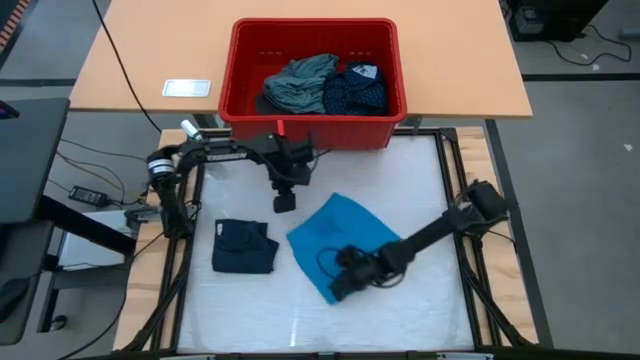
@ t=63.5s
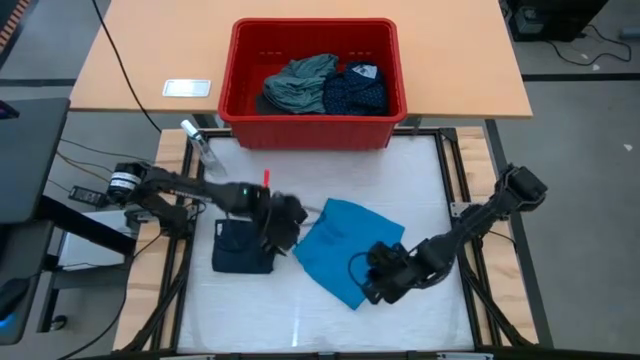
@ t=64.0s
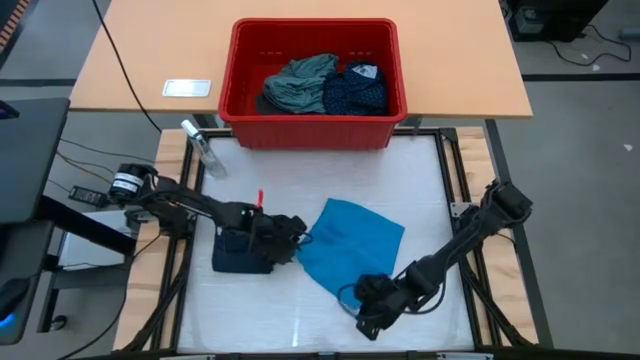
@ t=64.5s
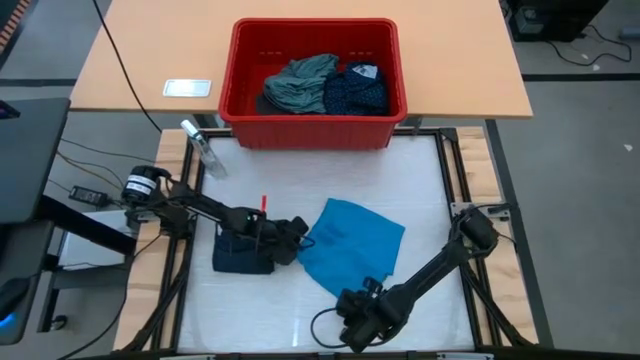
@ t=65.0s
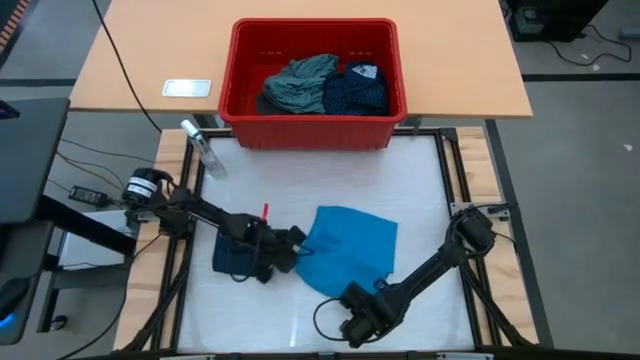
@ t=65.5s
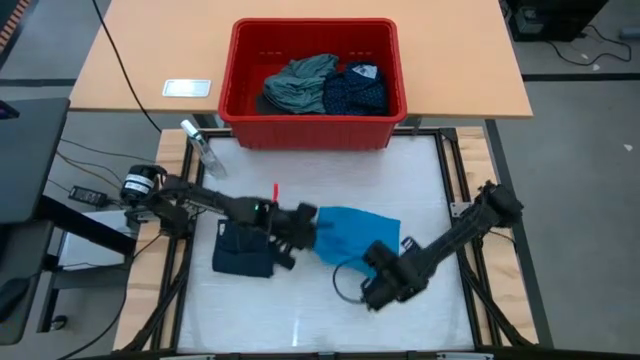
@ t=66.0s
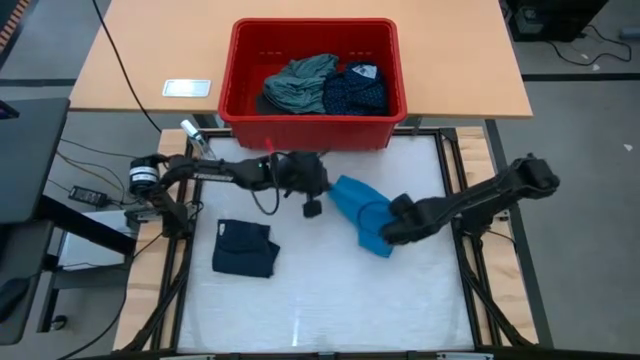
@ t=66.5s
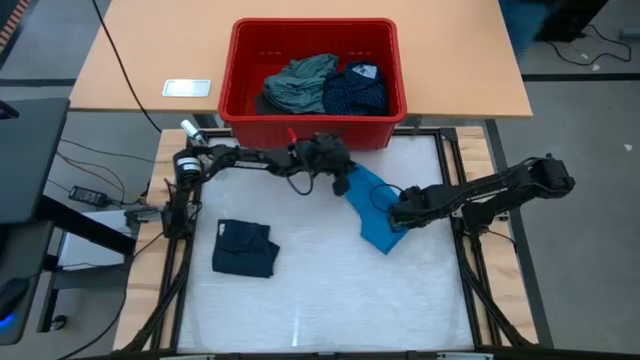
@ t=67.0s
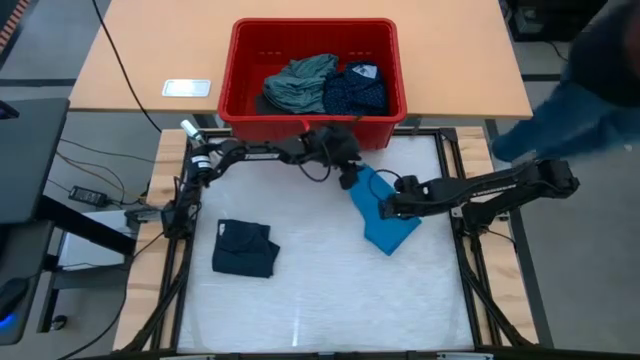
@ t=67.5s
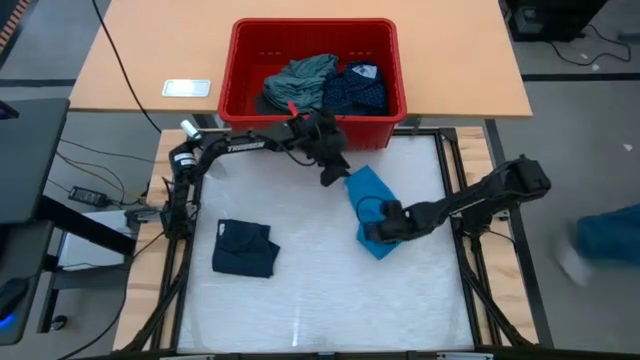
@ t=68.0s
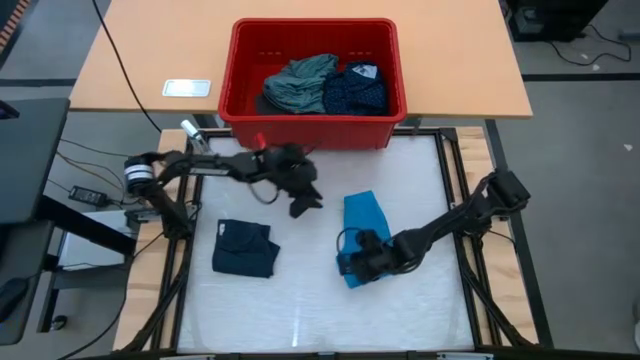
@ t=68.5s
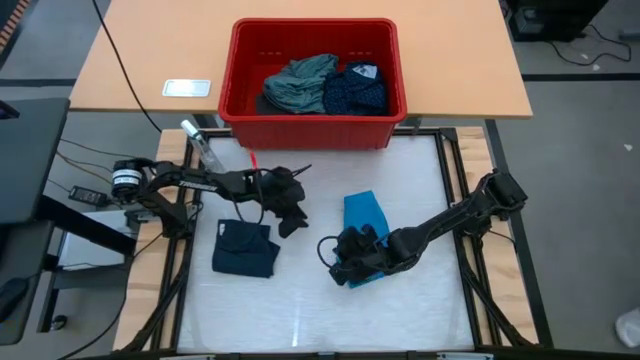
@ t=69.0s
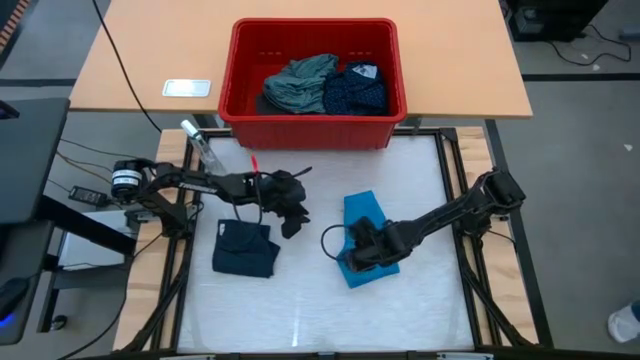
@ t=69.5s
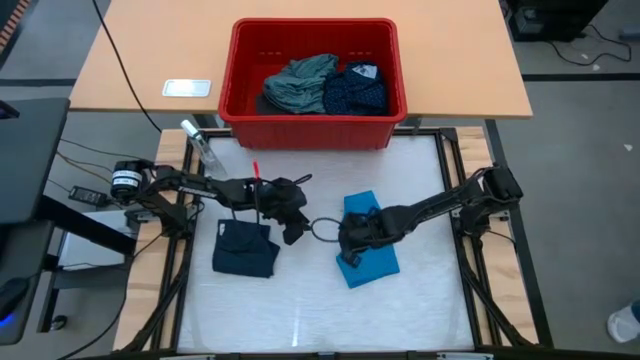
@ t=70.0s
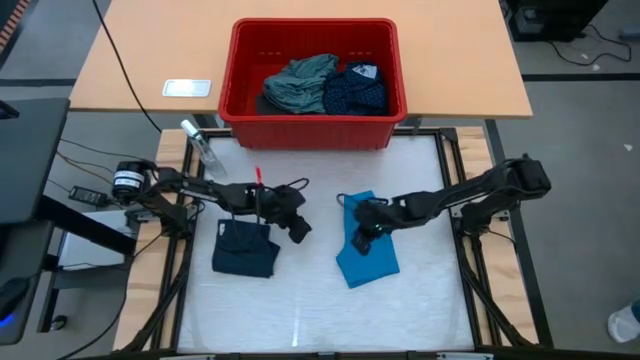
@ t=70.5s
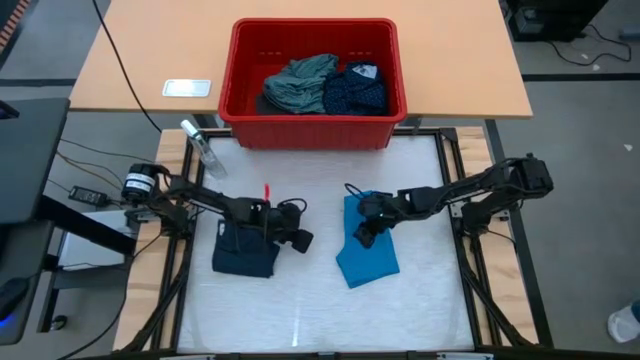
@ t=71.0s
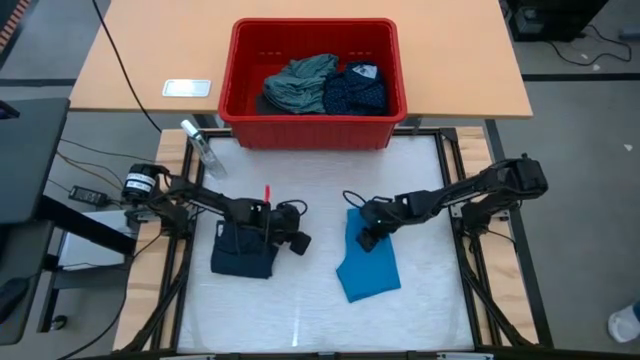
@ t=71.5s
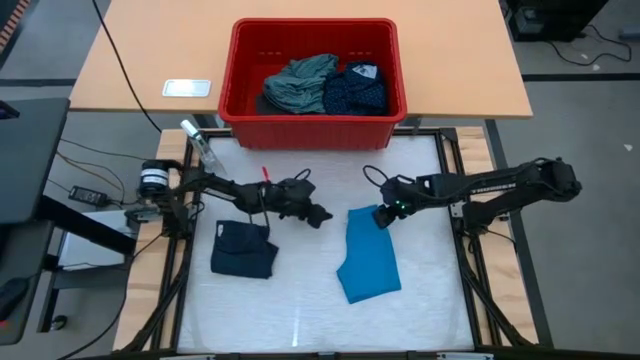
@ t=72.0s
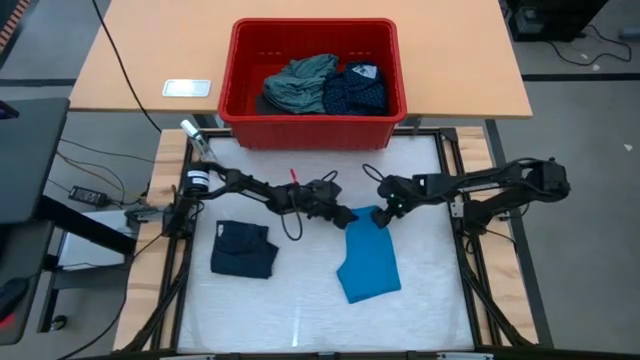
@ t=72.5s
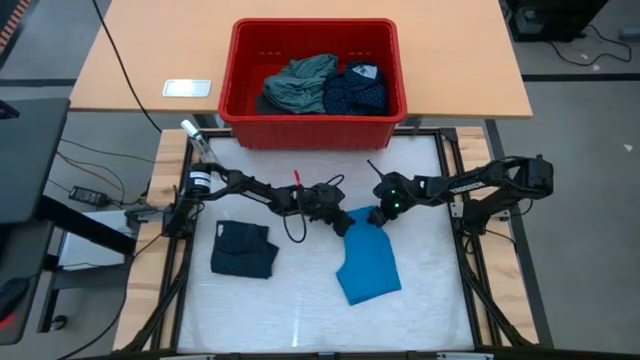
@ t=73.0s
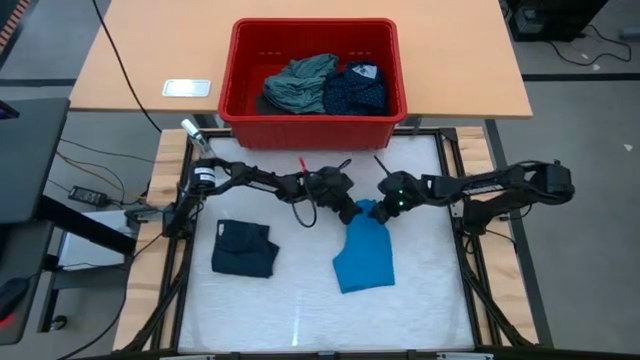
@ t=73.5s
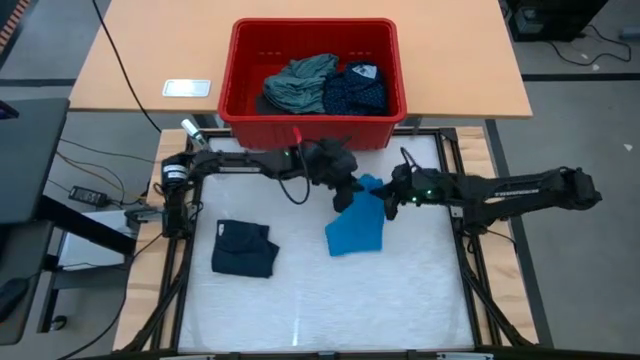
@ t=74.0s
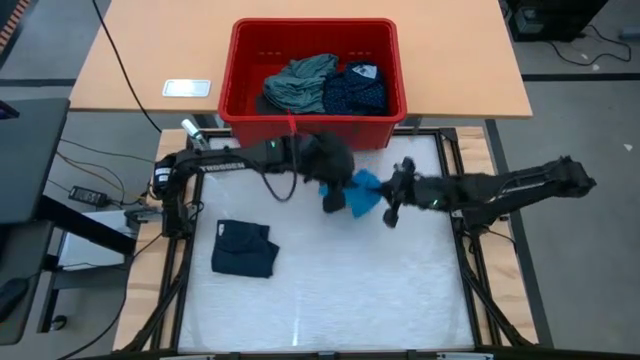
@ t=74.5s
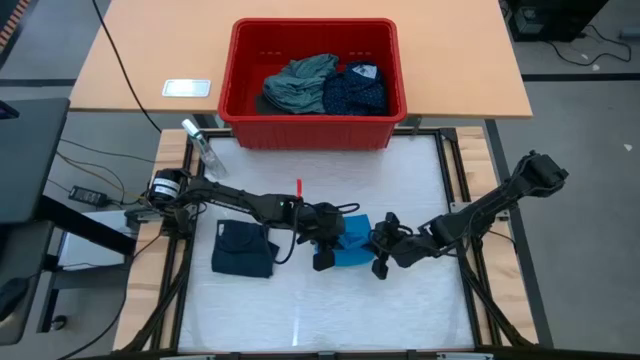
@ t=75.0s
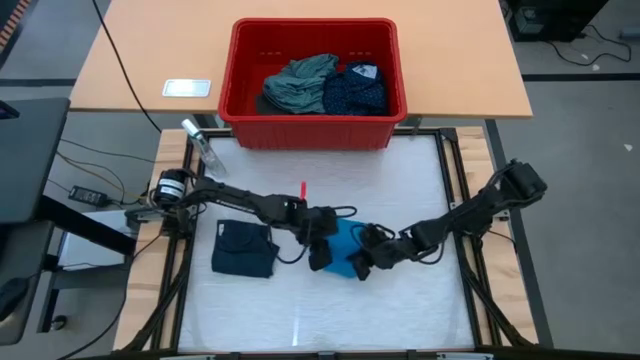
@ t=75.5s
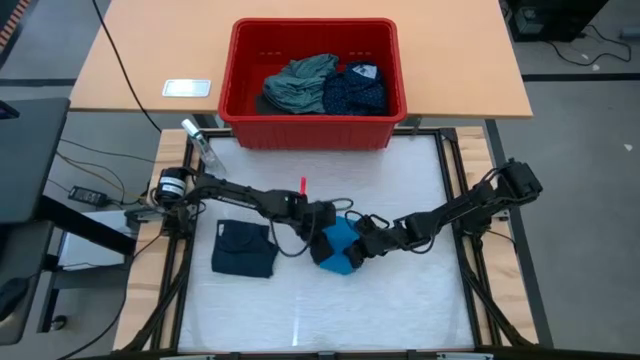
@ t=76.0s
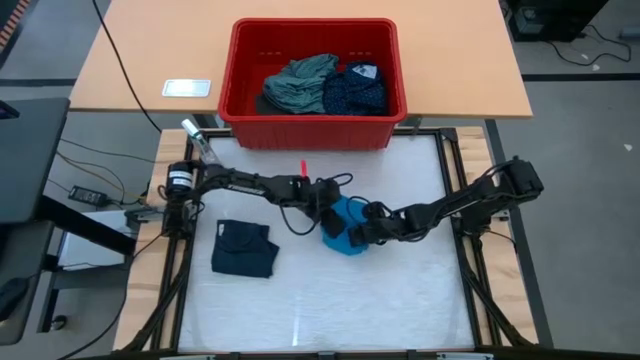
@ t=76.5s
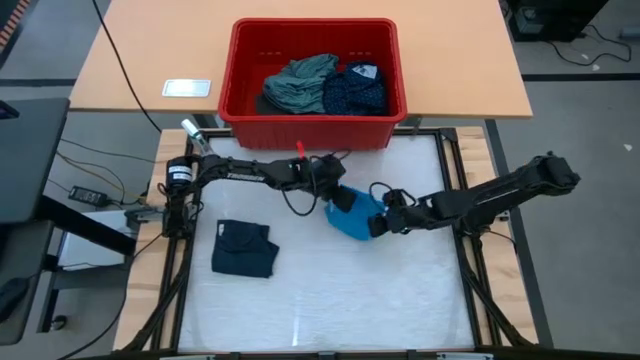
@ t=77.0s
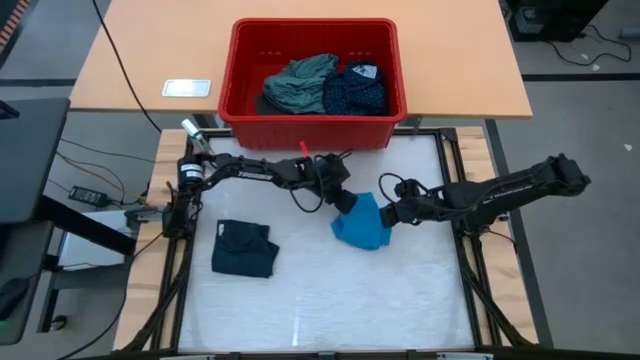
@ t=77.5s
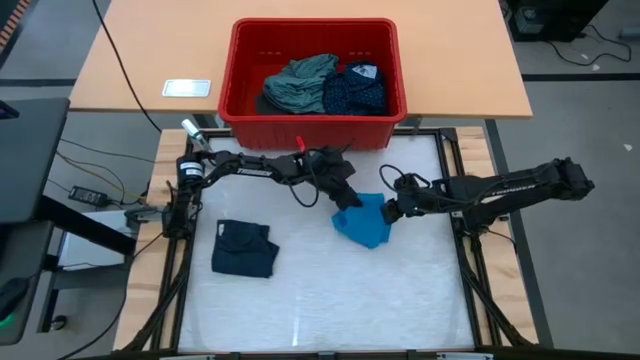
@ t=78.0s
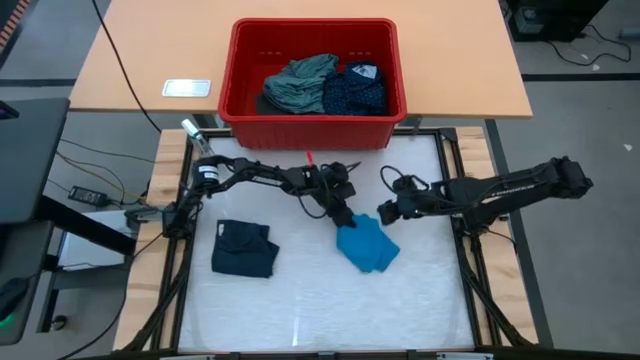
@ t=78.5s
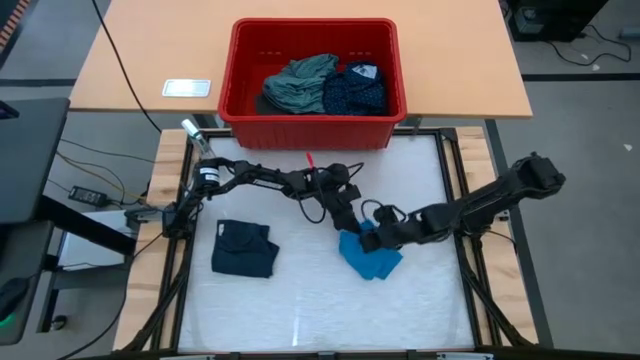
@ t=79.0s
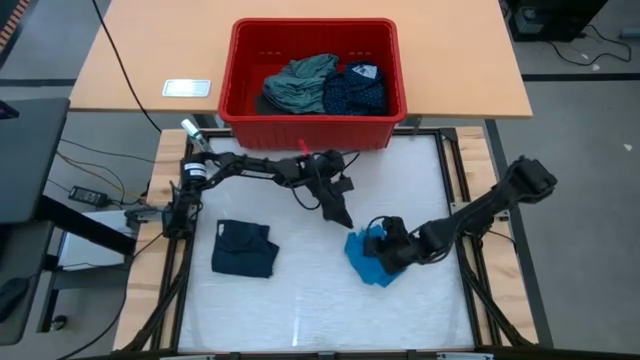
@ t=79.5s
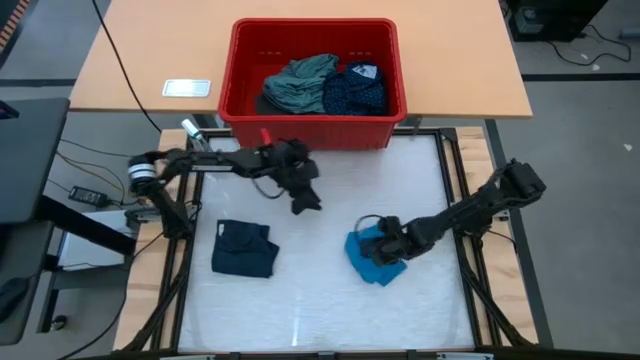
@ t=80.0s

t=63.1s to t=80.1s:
Task: Fold laundry
Fold the light blue shorts

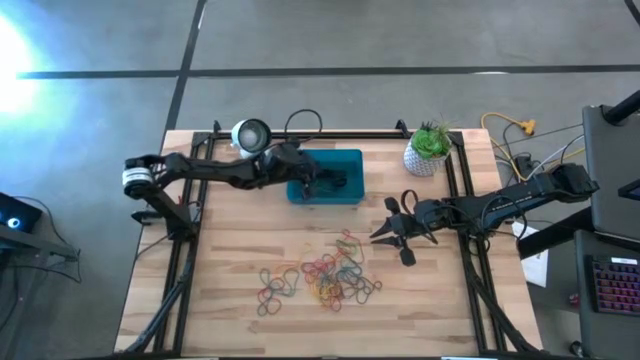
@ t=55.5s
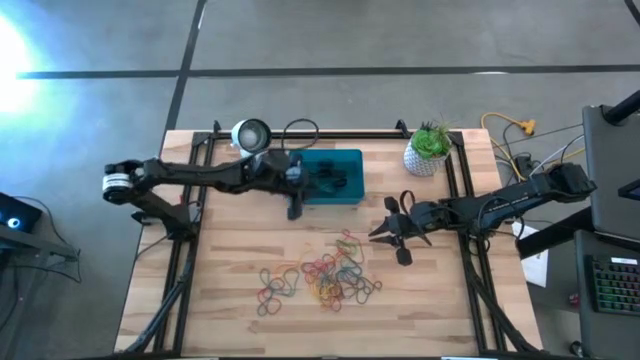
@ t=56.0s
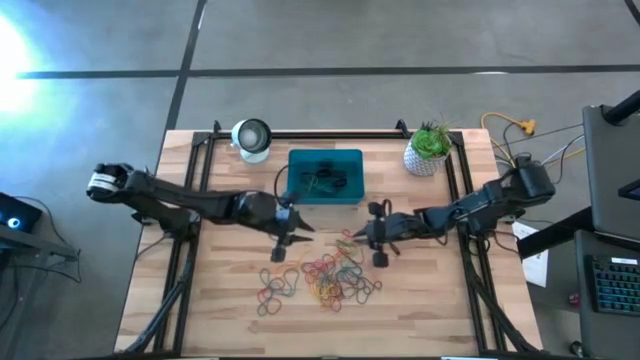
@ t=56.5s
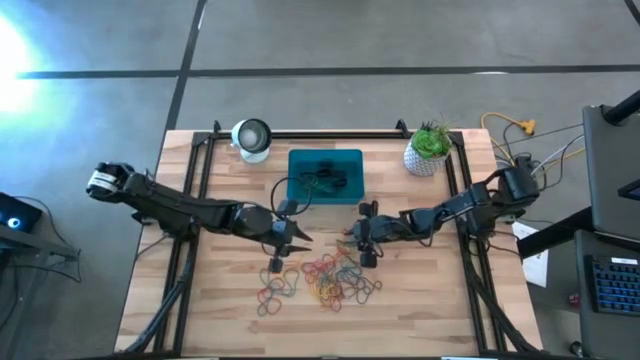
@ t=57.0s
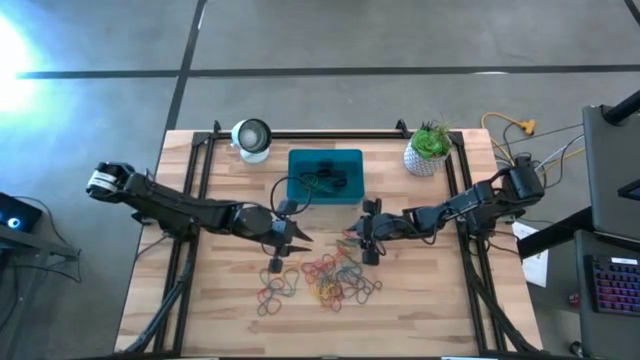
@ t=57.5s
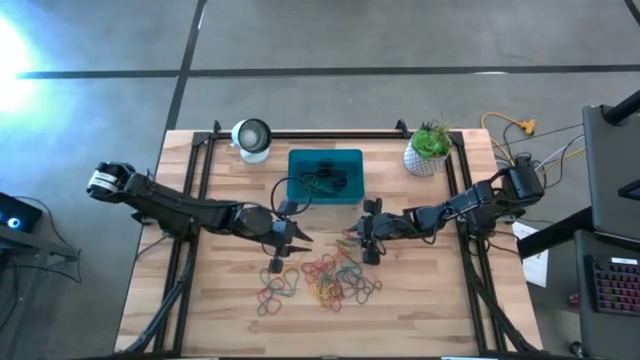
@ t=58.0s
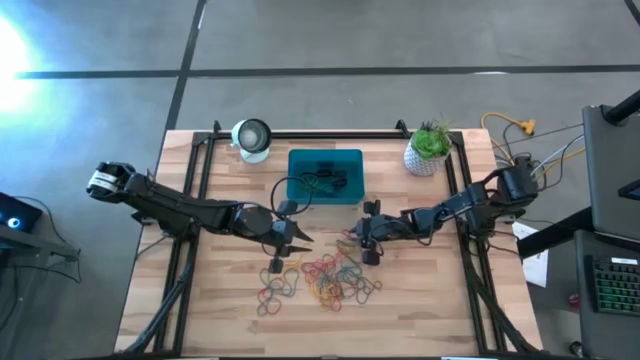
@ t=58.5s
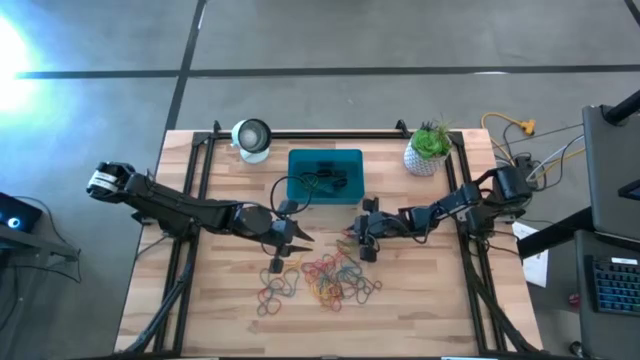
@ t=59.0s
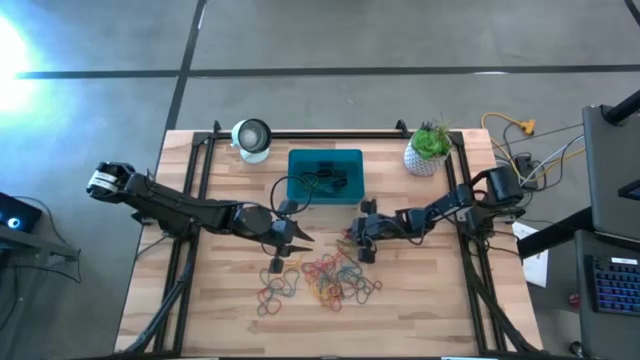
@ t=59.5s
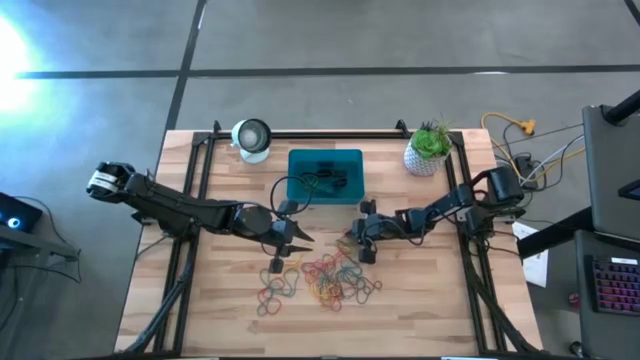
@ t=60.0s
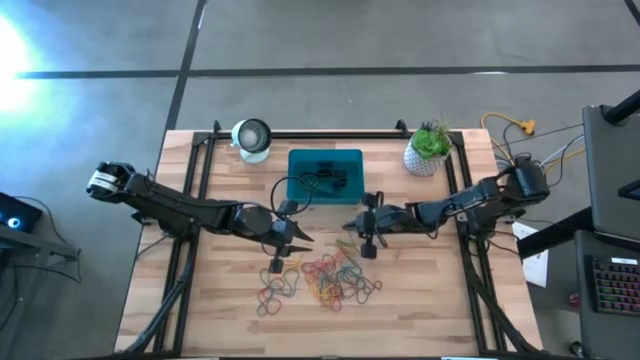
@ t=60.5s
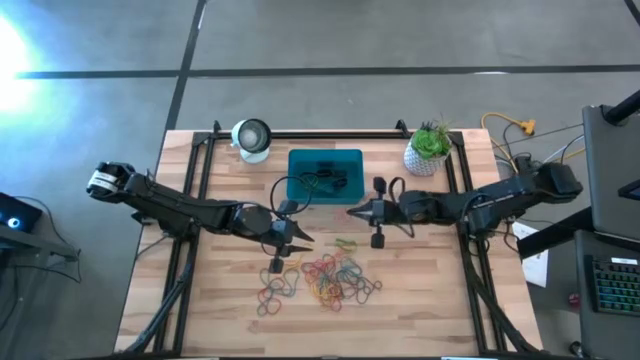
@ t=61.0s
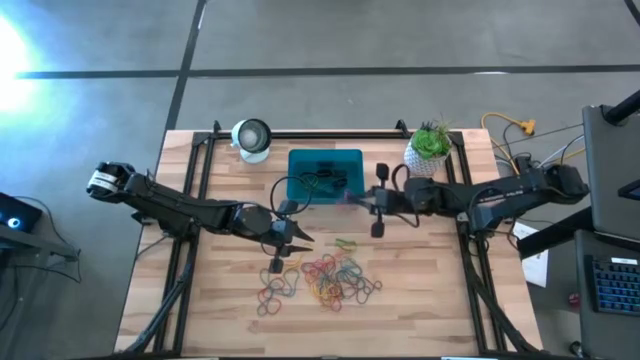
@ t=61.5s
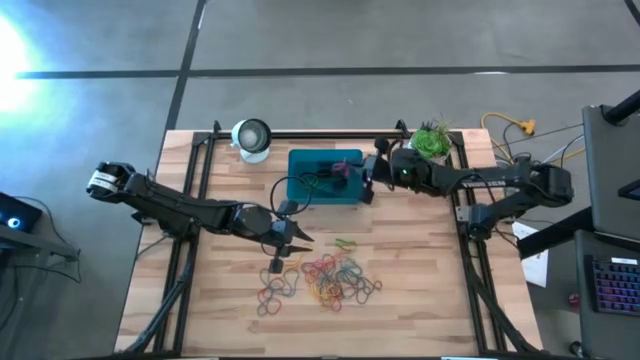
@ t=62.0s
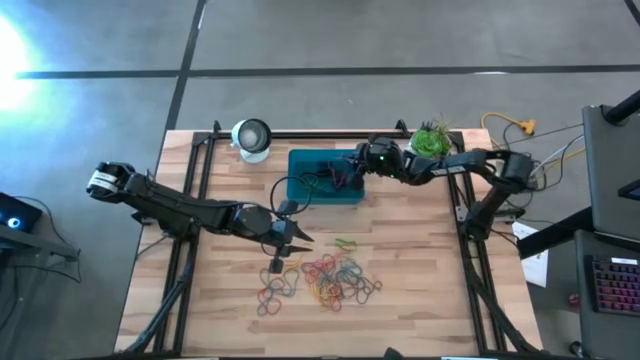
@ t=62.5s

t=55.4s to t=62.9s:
Task: Pick and place rubber bands into bin
Put the red rubber band into the bin
